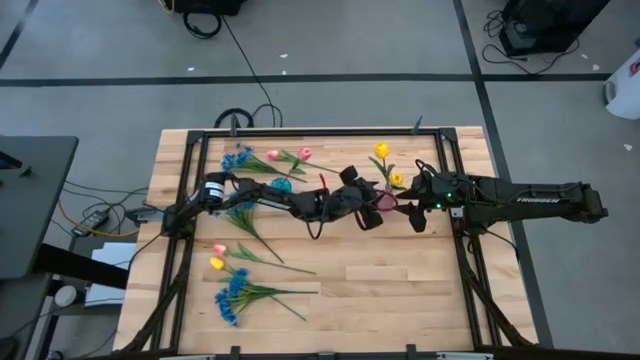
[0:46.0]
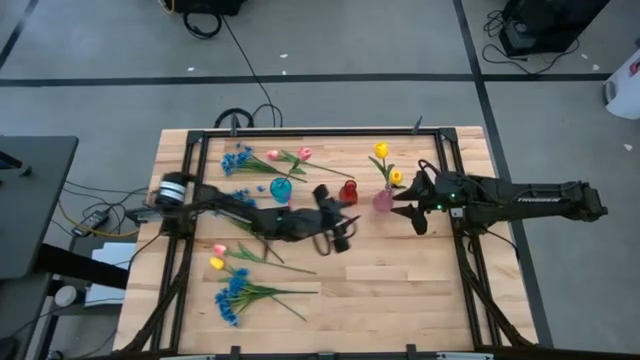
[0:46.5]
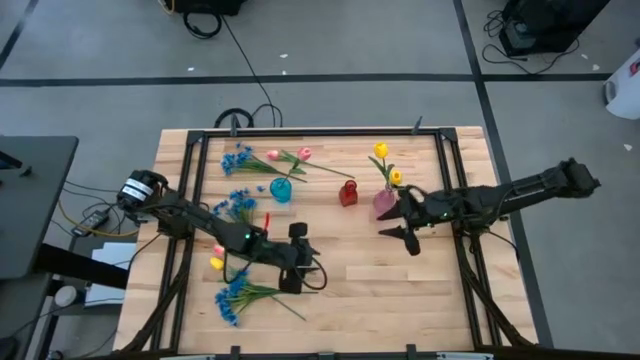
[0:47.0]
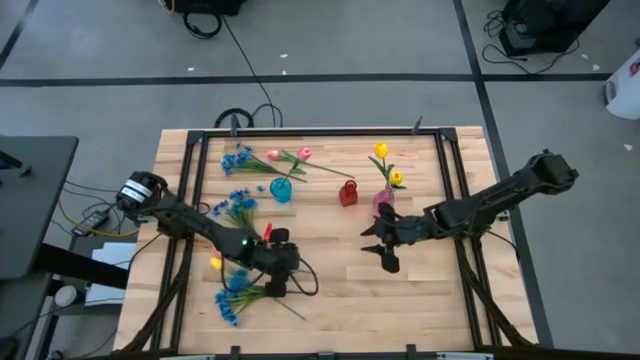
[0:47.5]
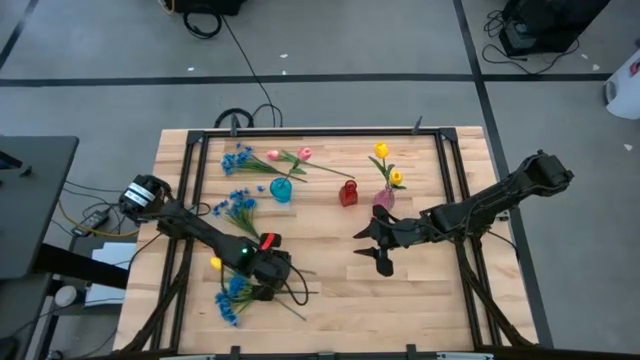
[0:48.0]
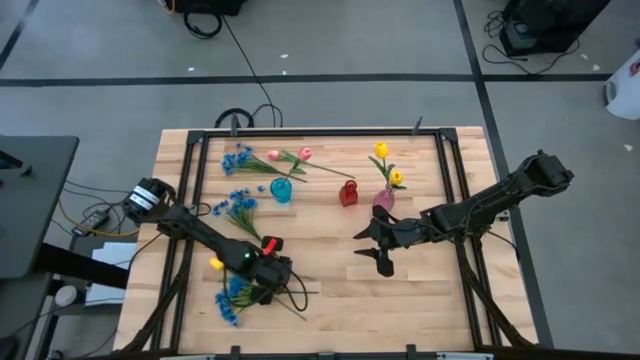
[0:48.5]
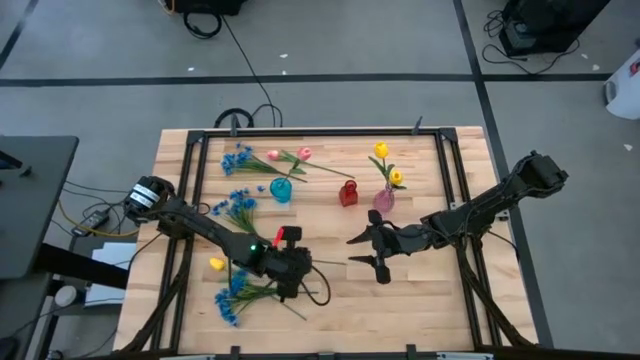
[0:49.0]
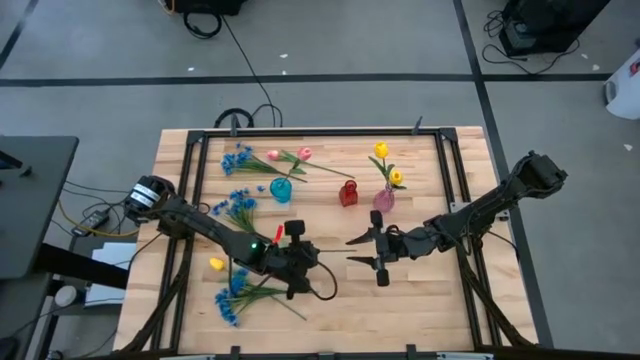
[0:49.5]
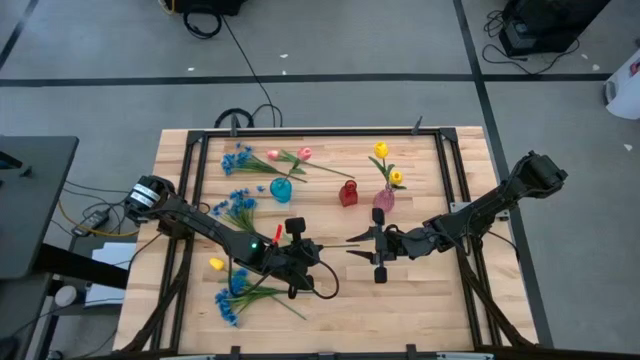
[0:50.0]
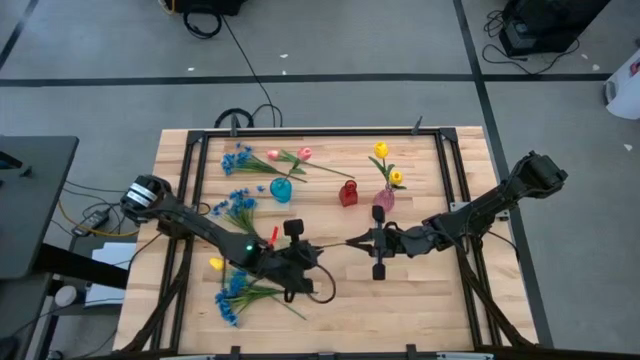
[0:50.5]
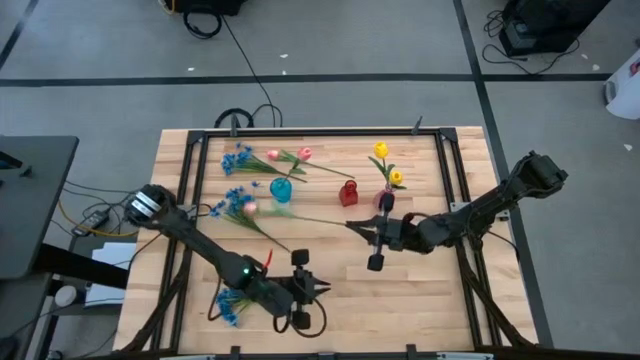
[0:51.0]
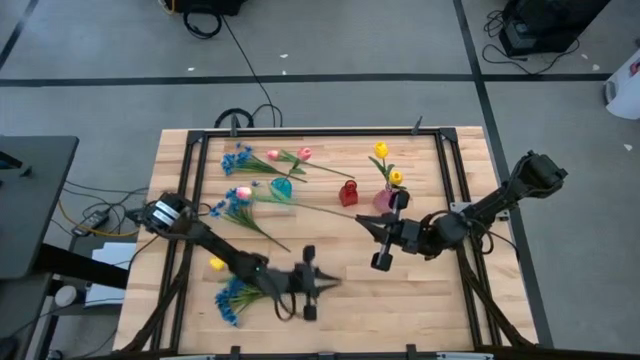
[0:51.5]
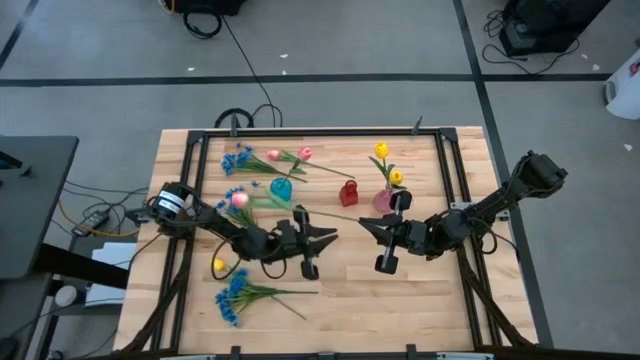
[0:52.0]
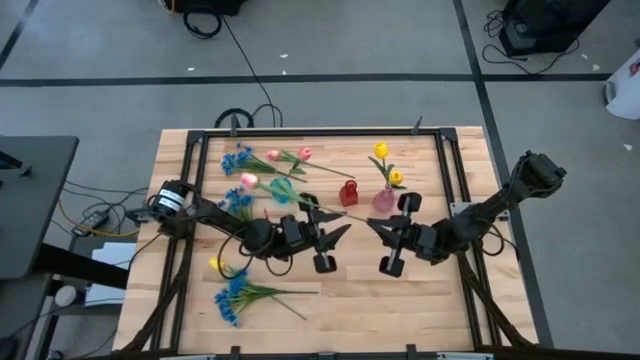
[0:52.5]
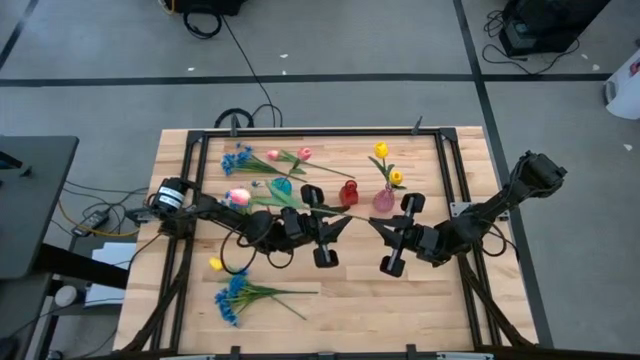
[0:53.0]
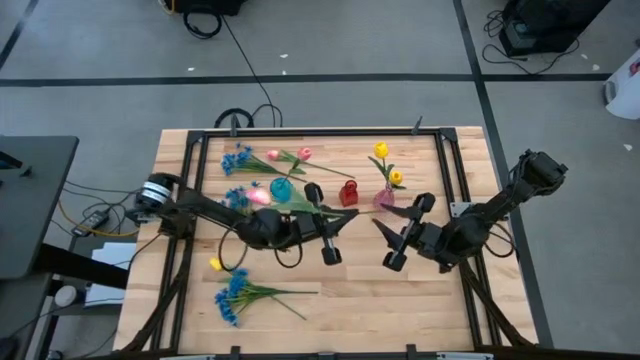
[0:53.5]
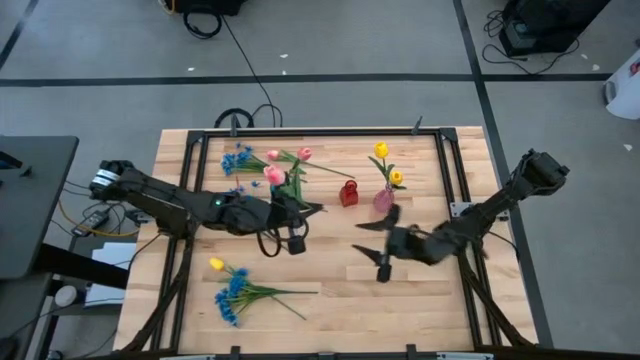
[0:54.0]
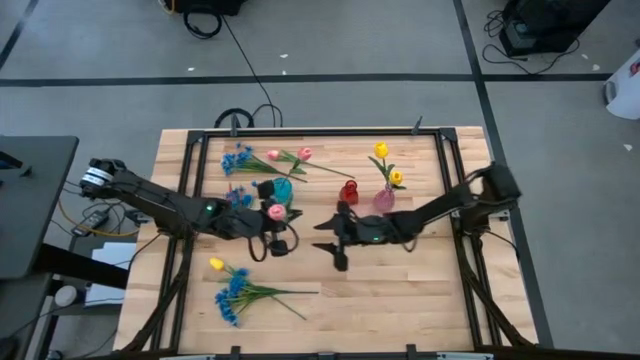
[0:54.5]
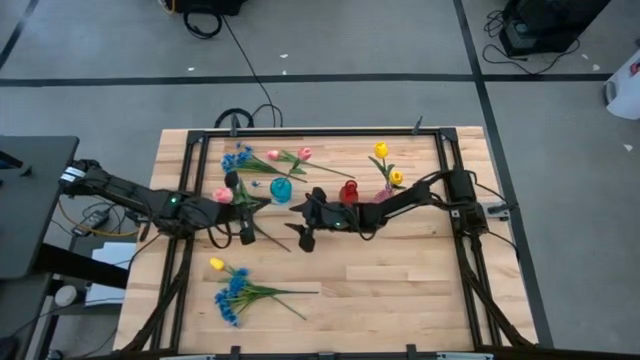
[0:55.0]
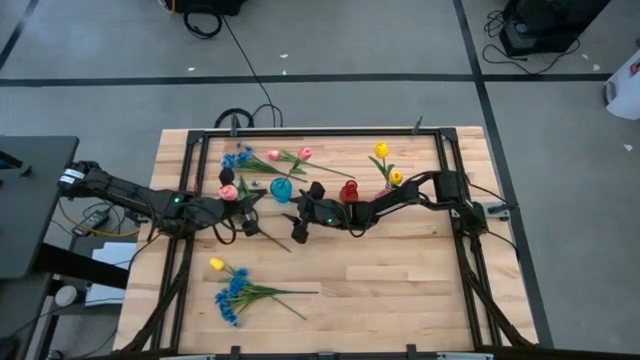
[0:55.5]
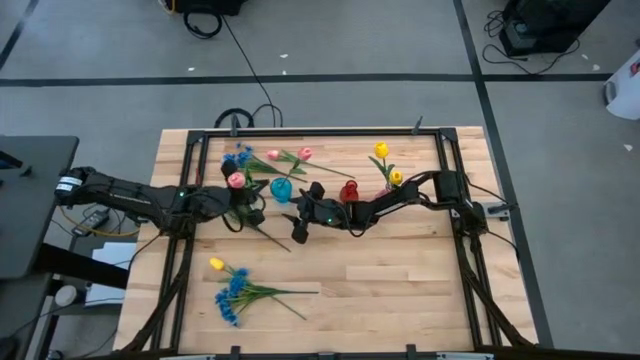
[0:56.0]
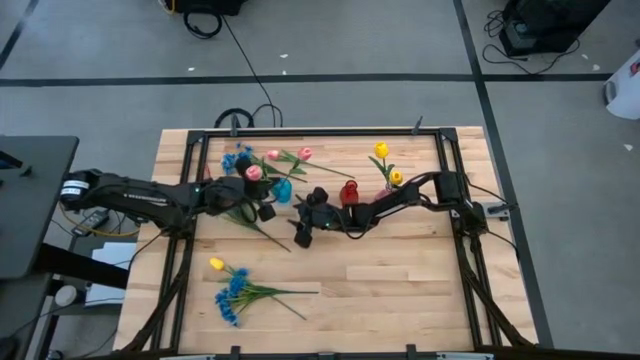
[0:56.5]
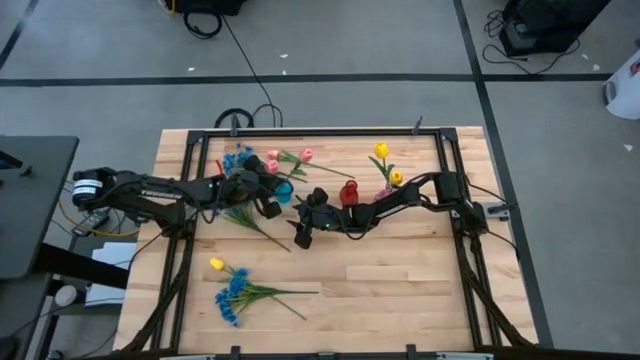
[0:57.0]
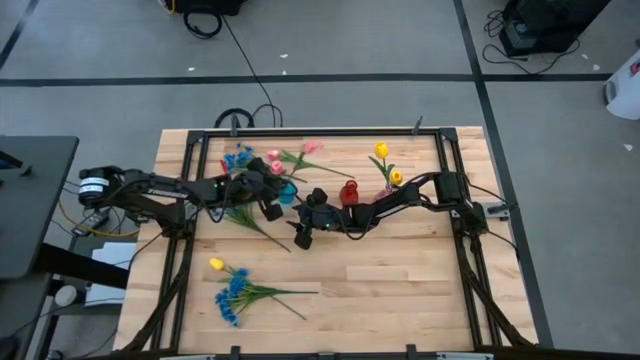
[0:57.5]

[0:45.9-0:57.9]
Task: Sort flowers into vase by color
Put the bottom pink flower into the blue vase

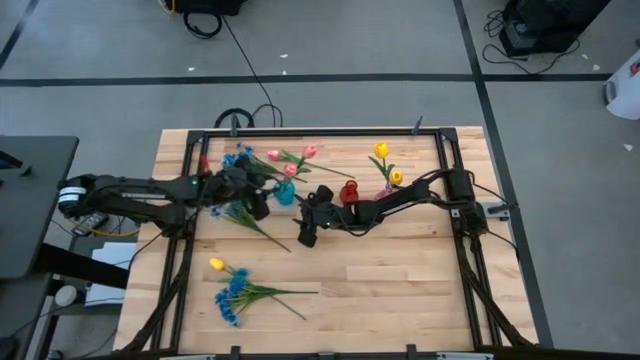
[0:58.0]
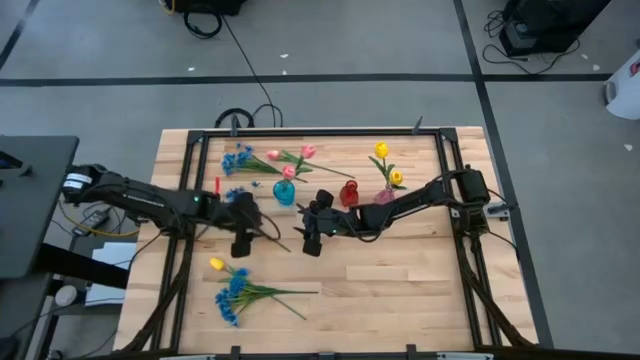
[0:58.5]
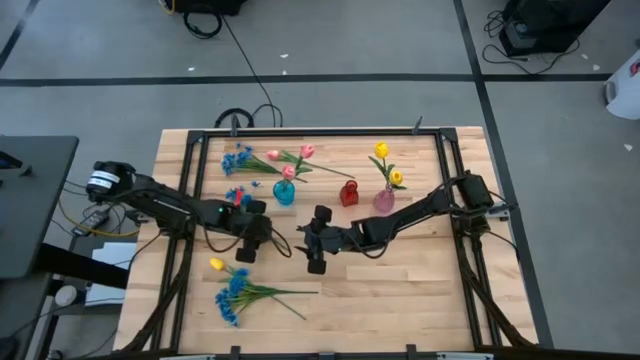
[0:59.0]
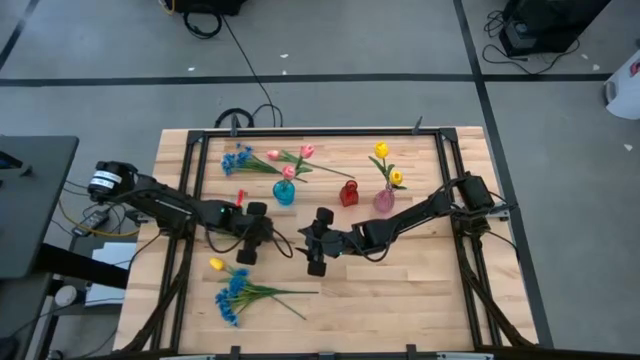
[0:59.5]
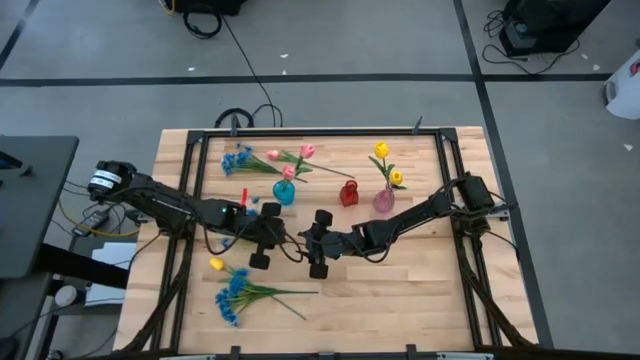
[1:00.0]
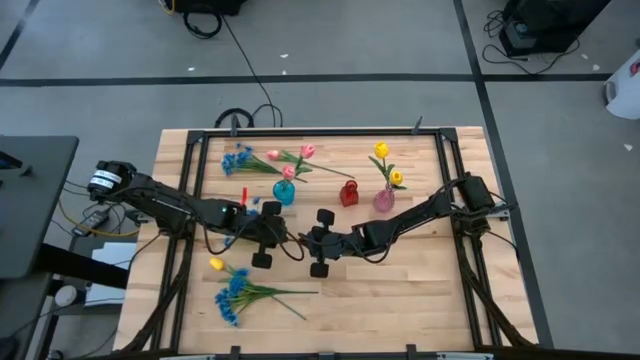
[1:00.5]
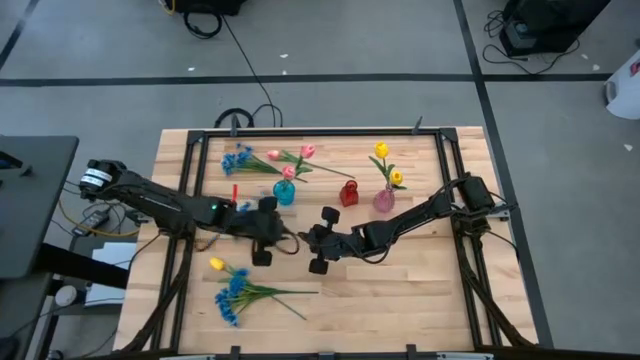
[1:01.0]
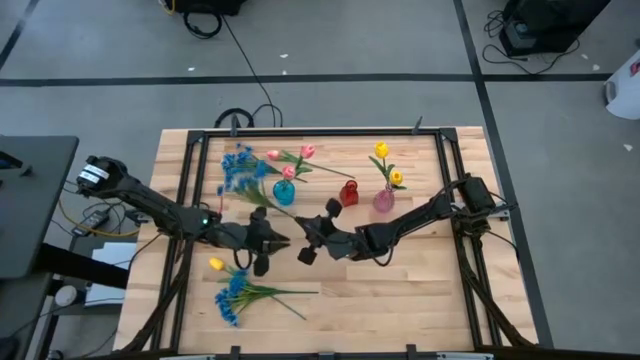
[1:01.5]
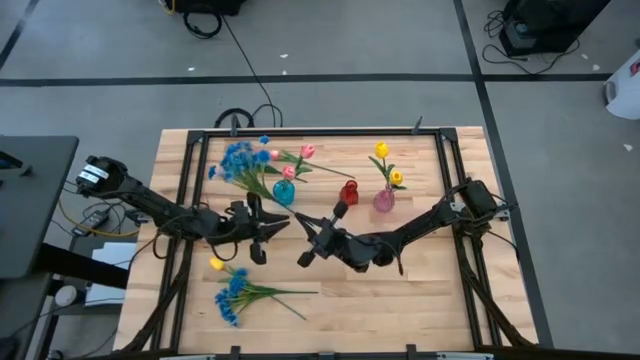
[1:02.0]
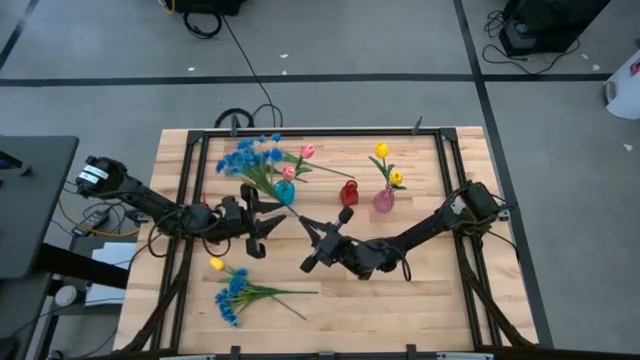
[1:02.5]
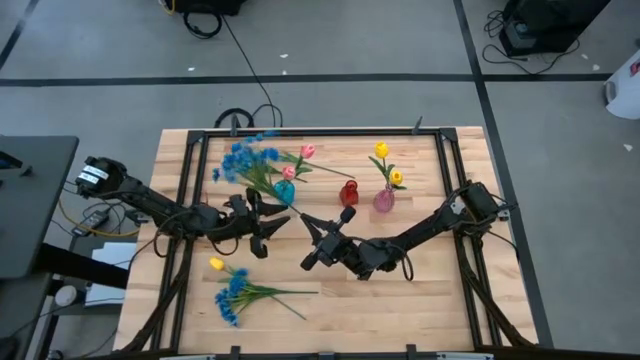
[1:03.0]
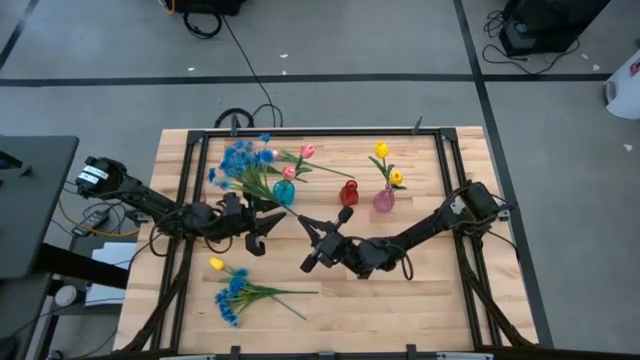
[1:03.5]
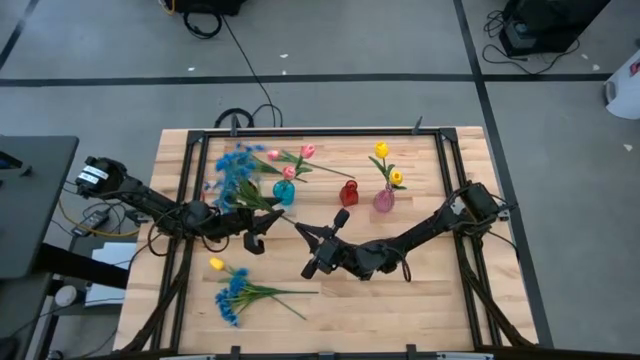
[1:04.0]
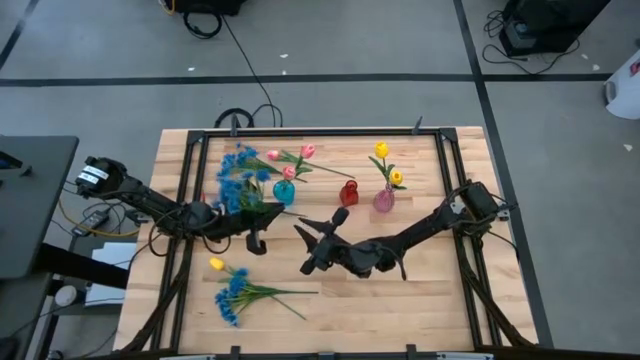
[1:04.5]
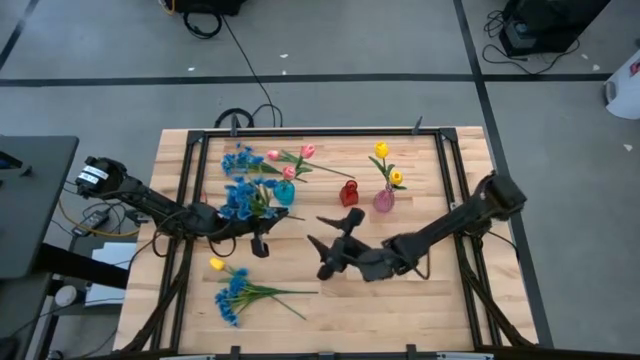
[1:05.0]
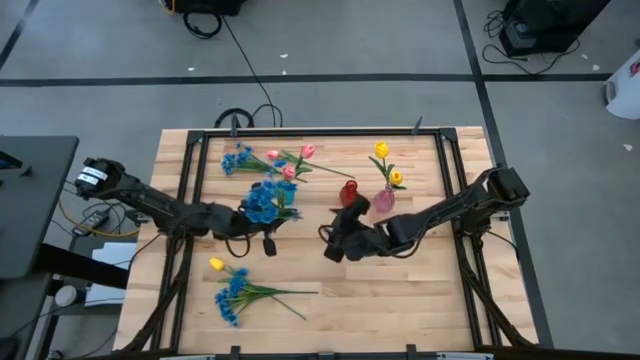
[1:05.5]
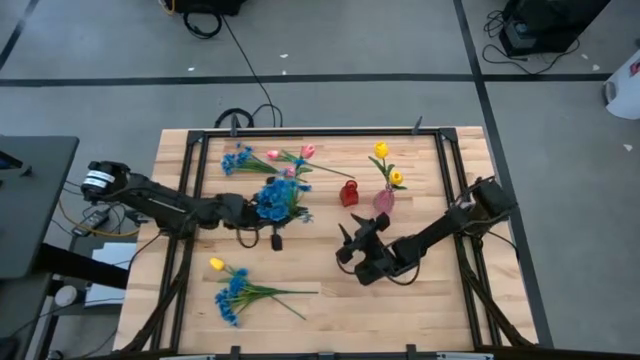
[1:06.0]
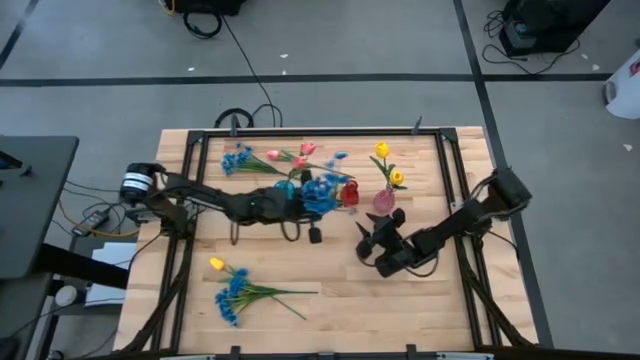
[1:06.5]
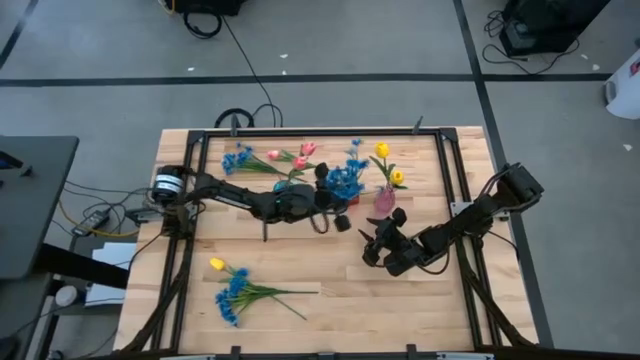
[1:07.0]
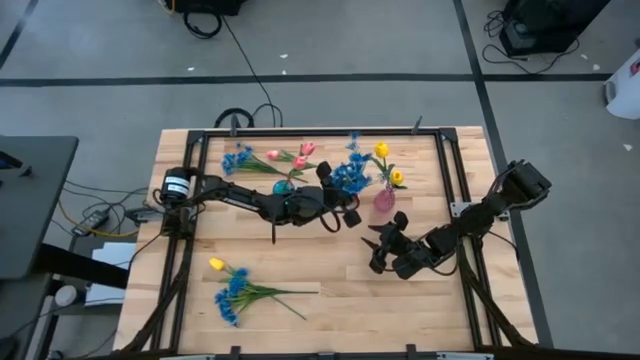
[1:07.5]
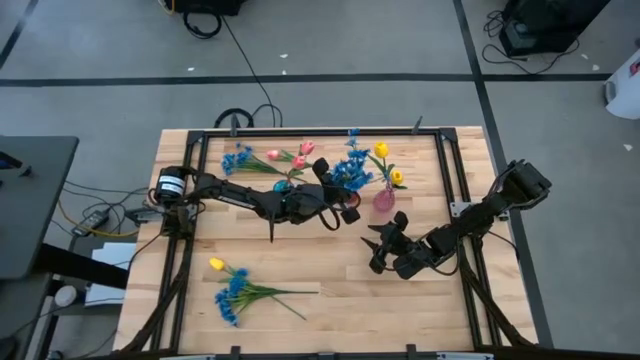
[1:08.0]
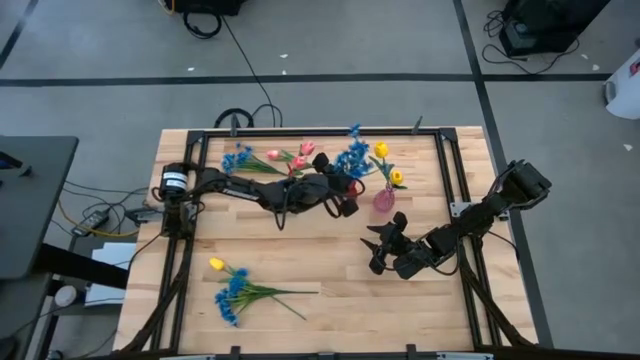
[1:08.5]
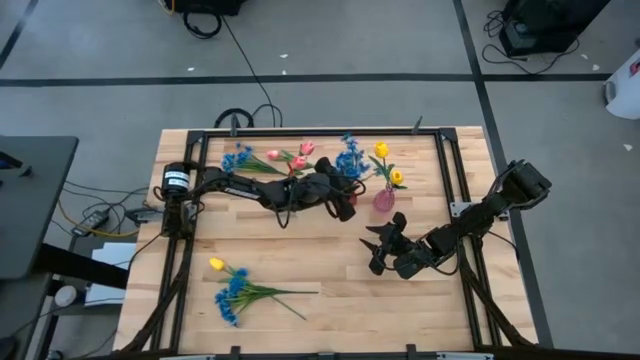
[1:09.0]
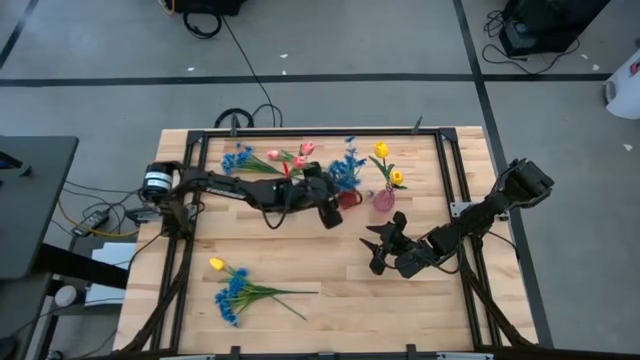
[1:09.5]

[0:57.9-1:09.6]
Put the middle blue flower into the red vase
